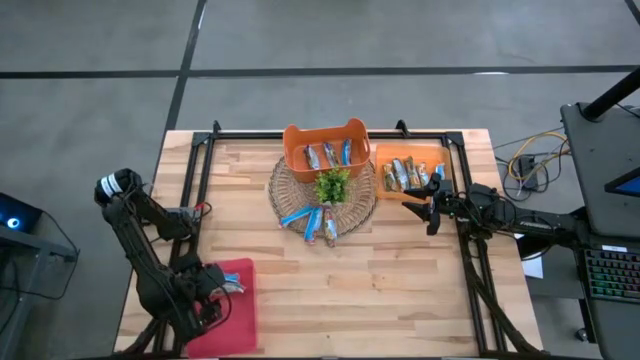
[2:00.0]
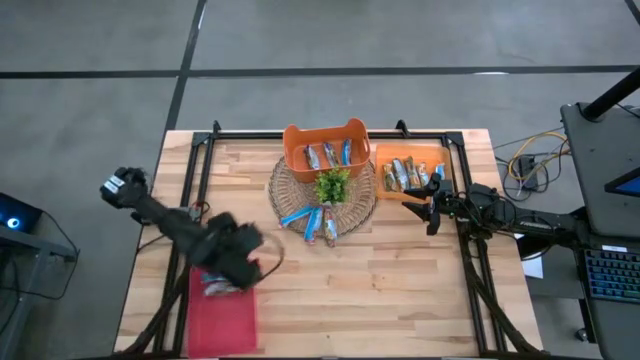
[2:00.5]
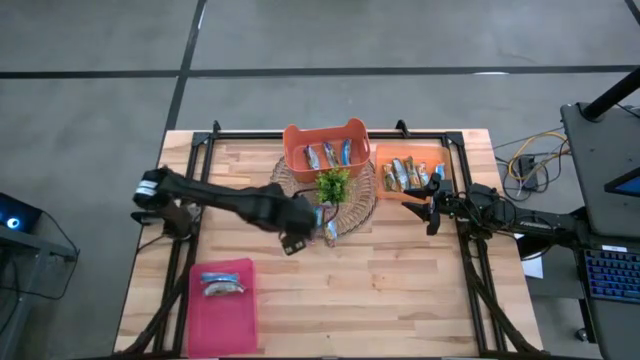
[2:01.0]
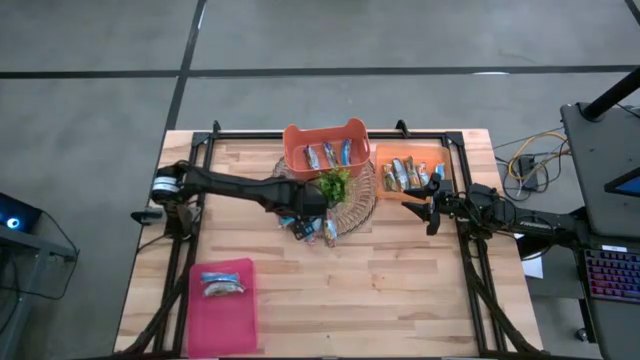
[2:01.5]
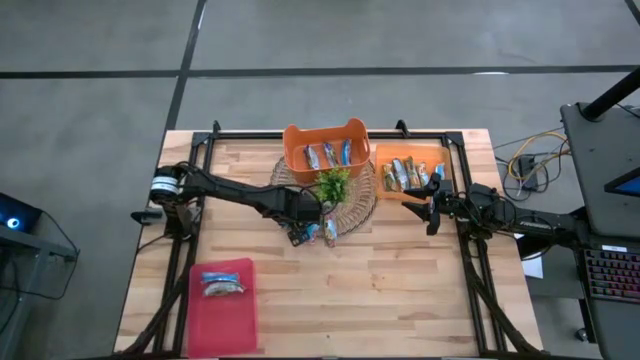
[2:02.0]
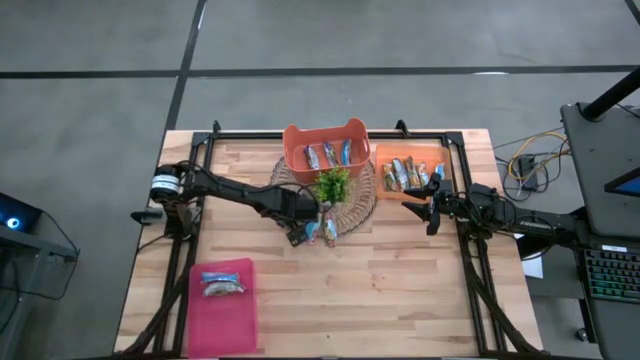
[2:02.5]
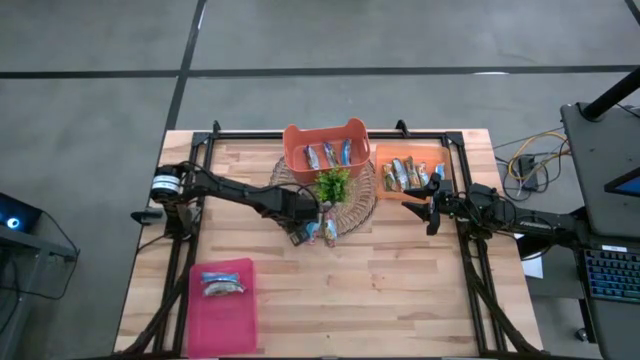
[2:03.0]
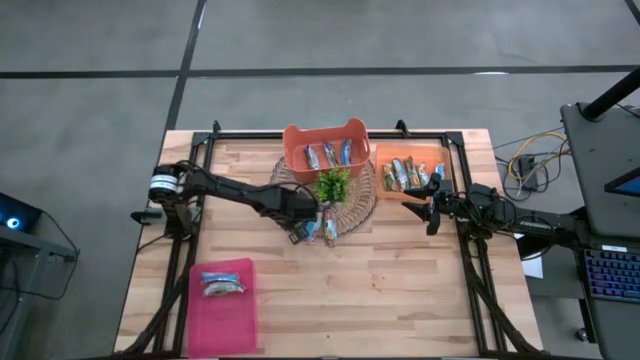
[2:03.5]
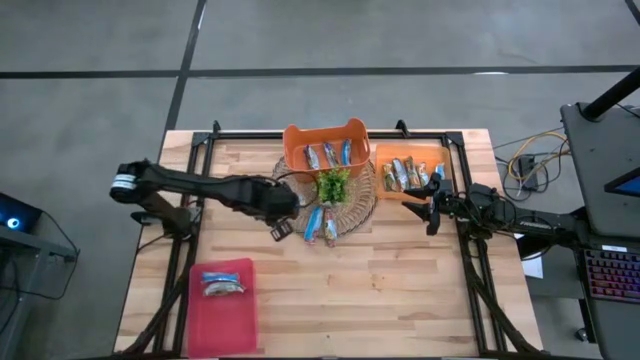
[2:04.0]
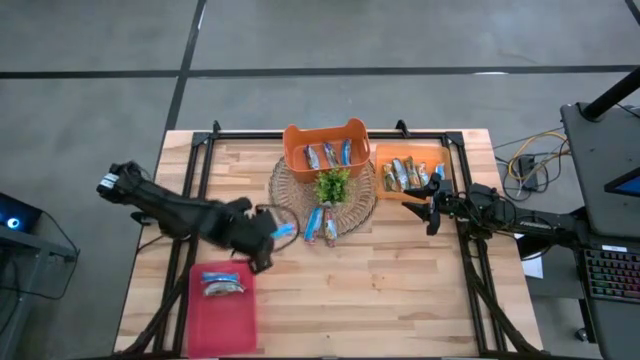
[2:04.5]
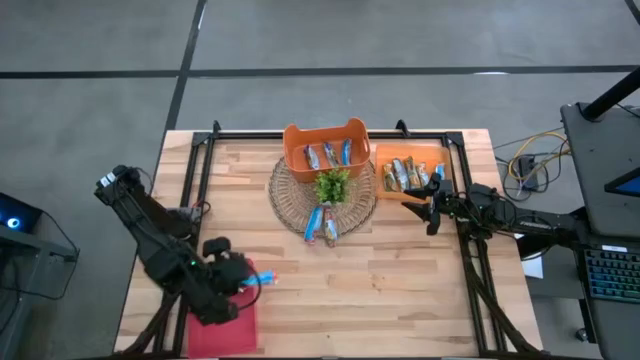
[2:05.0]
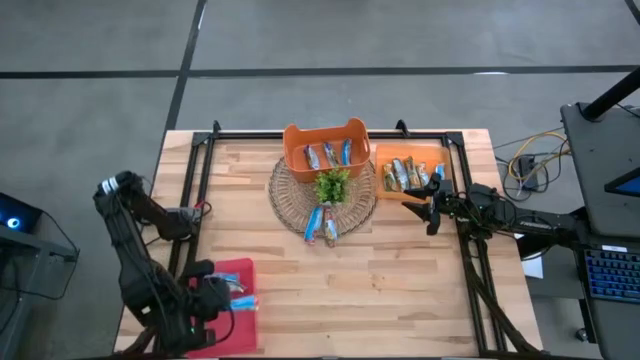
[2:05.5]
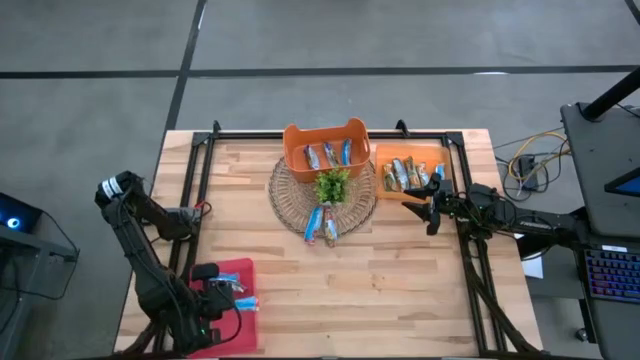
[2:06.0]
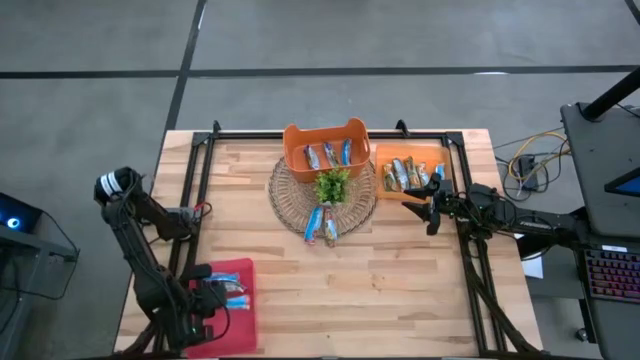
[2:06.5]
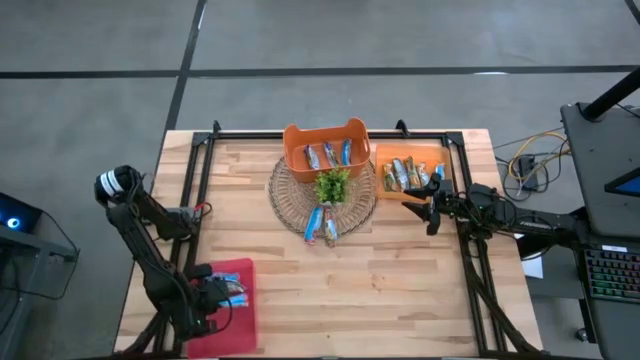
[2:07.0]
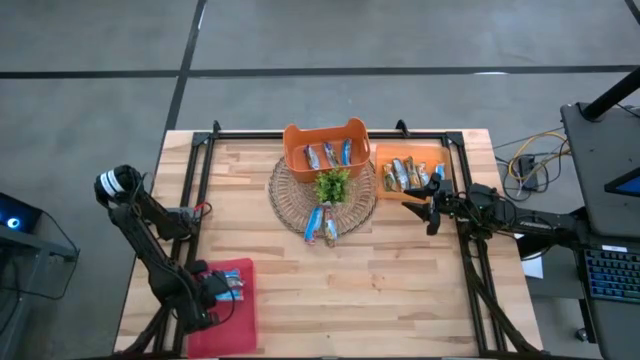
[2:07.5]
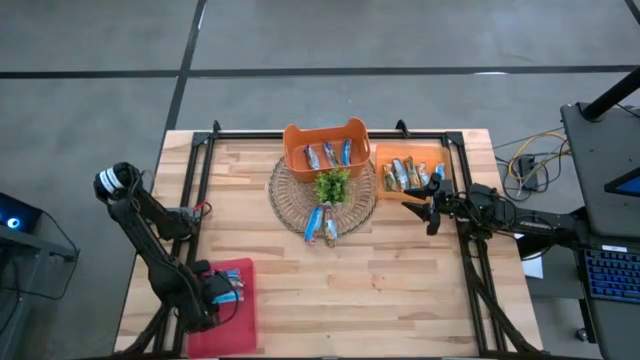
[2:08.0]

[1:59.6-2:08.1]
Task: Pick and place Granola Bars by type
Put the red granola bar into the pink bin

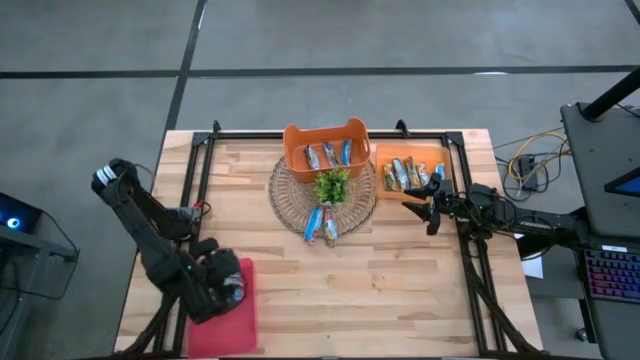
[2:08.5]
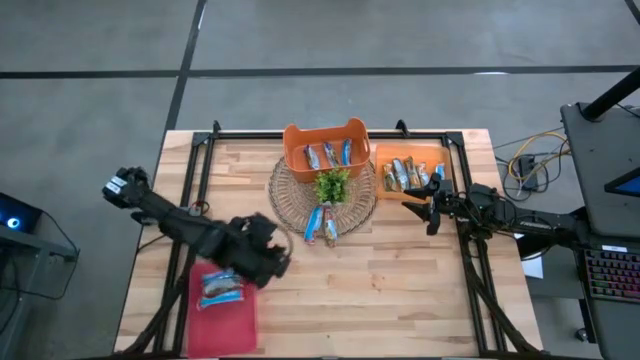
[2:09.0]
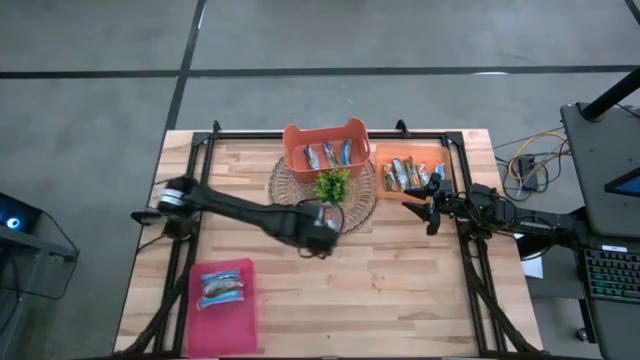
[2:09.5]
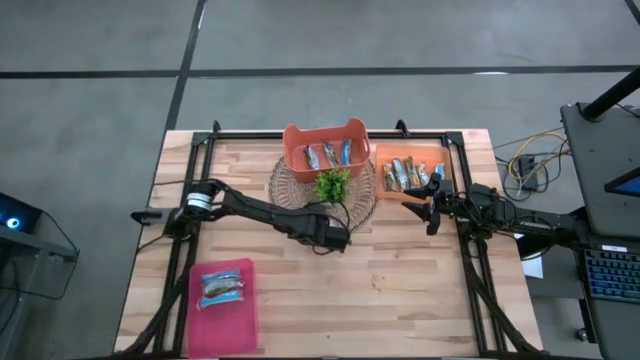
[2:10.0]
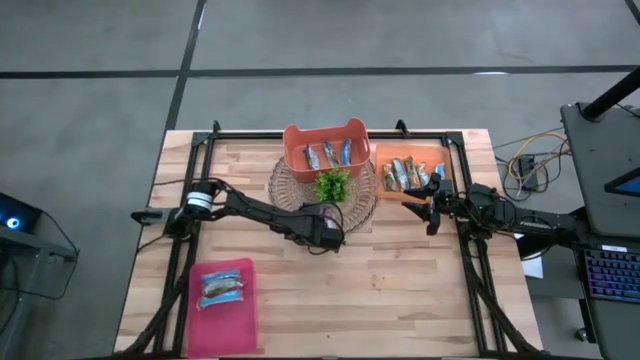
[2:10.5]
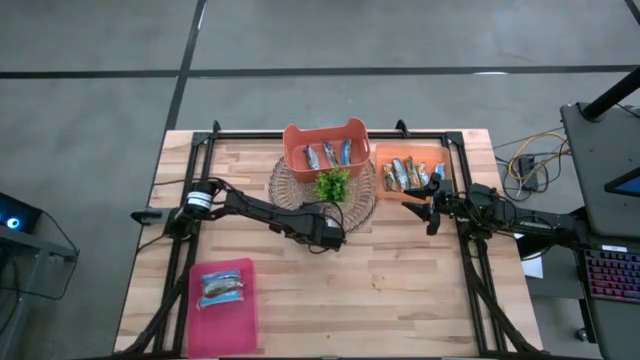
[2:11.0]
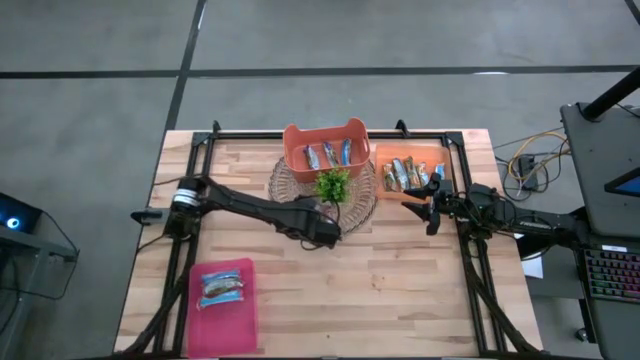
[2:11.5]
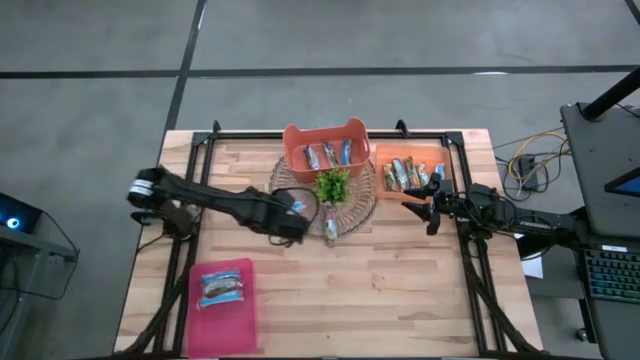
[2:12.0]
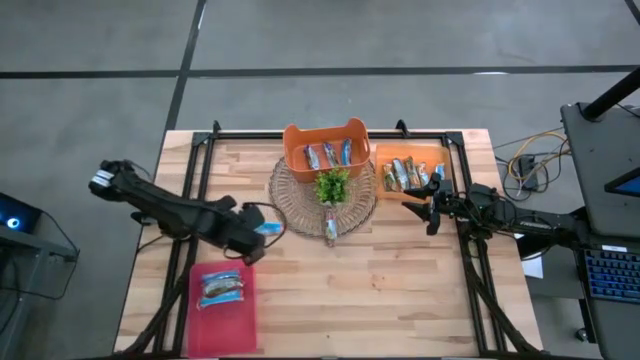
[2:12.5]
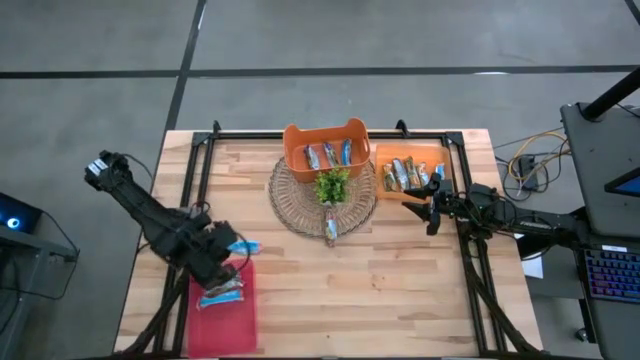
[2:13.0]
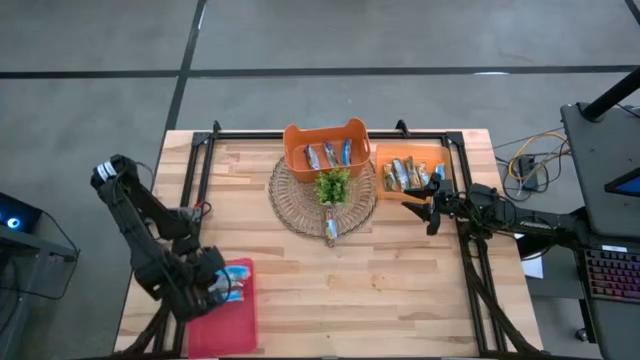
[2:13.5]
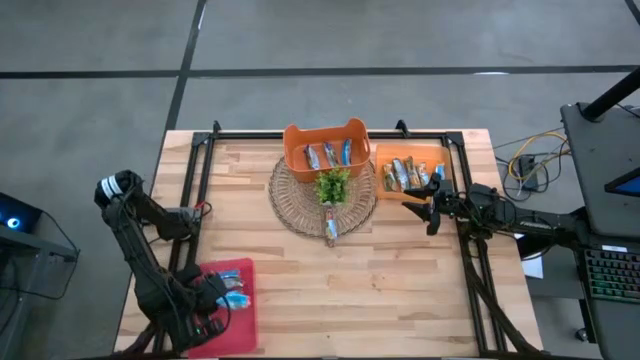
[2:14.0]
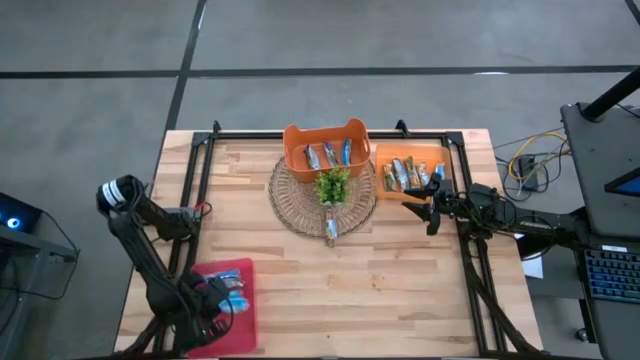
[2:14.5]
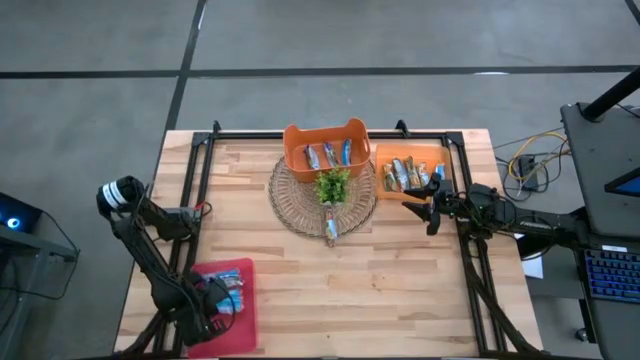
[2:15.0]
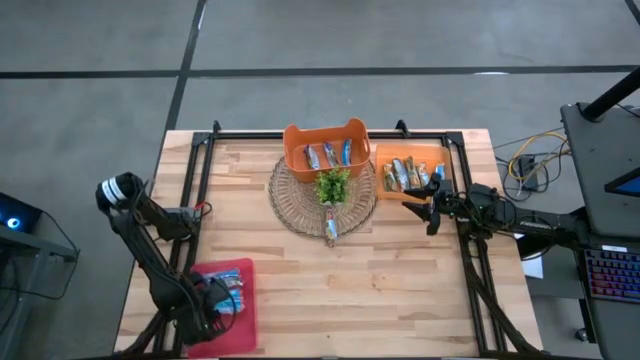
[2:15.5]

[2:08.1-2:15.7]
Put the red granola bar into the pink bin

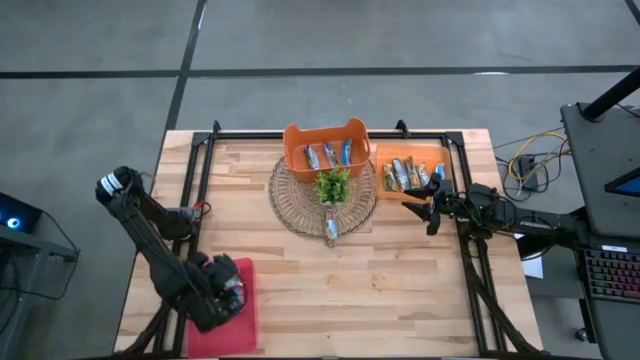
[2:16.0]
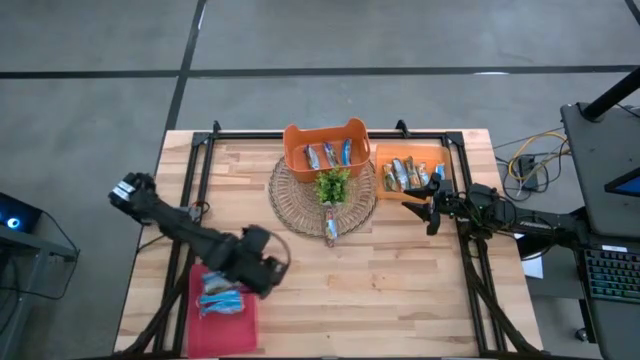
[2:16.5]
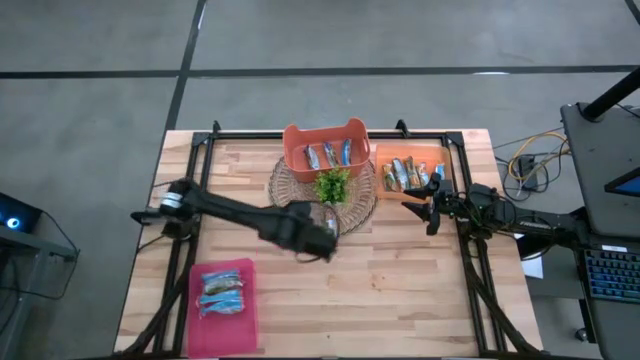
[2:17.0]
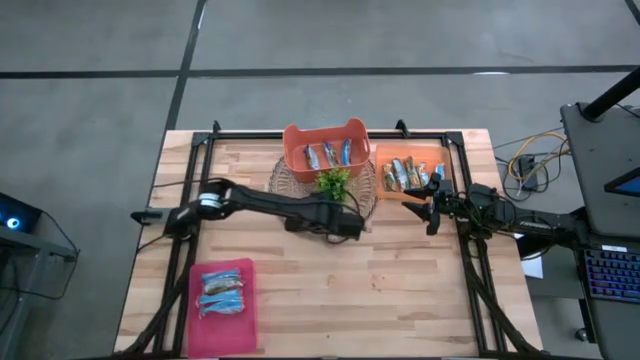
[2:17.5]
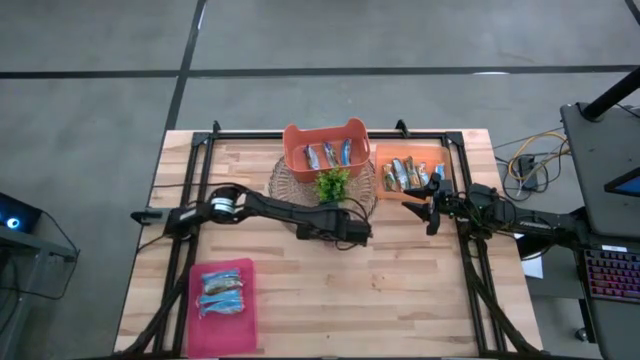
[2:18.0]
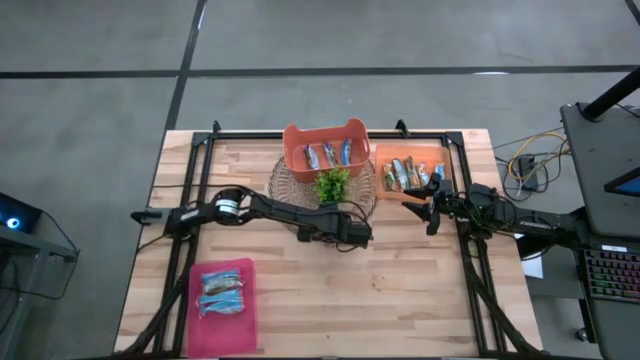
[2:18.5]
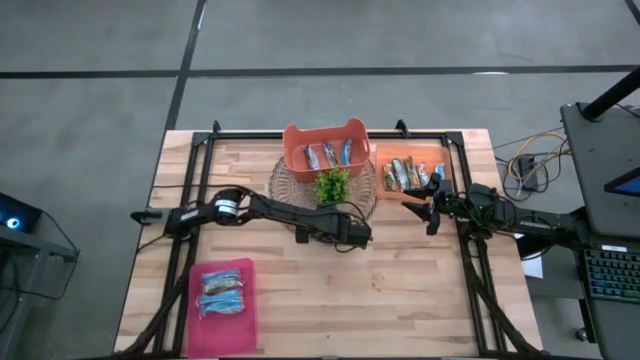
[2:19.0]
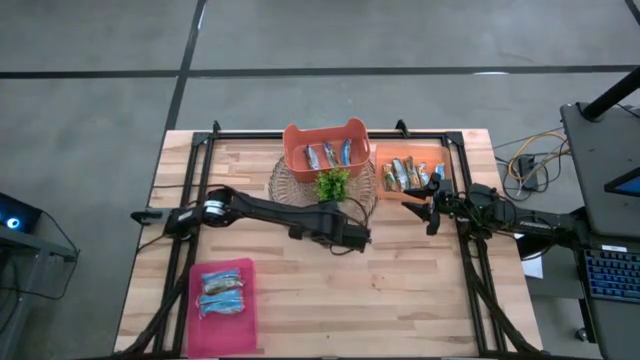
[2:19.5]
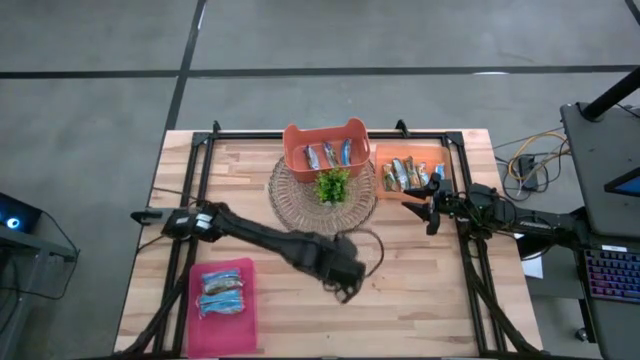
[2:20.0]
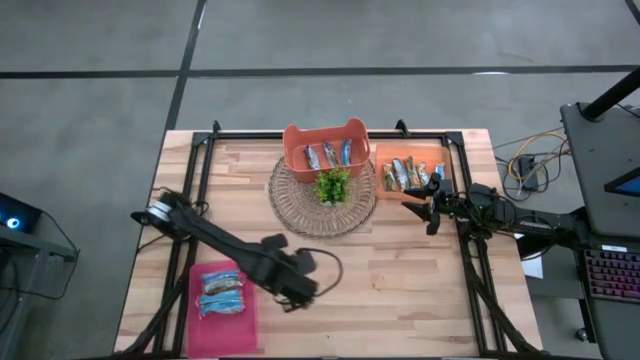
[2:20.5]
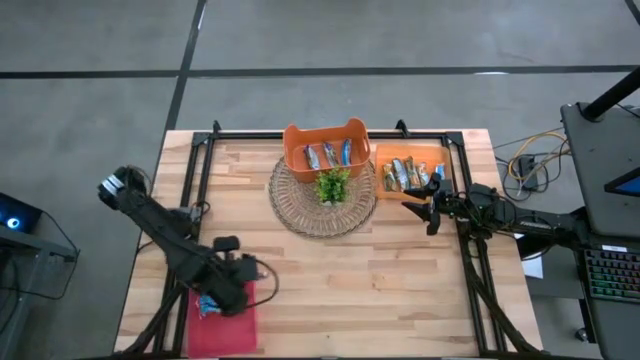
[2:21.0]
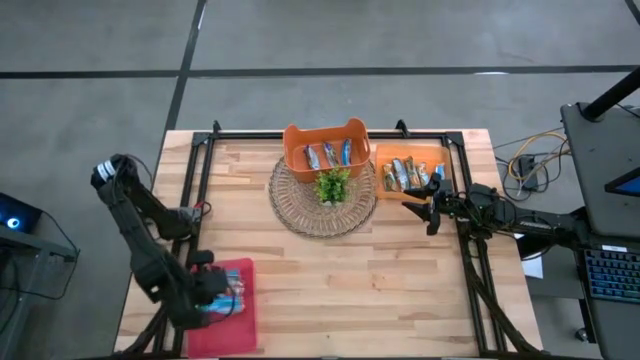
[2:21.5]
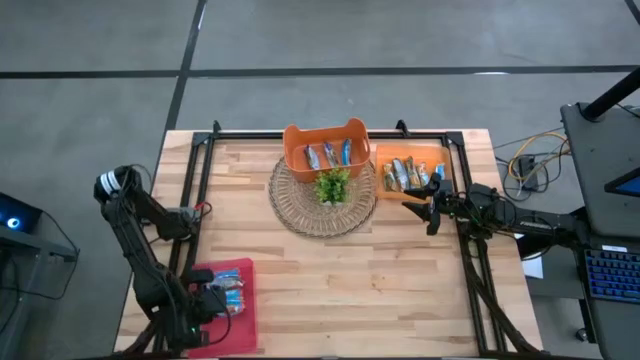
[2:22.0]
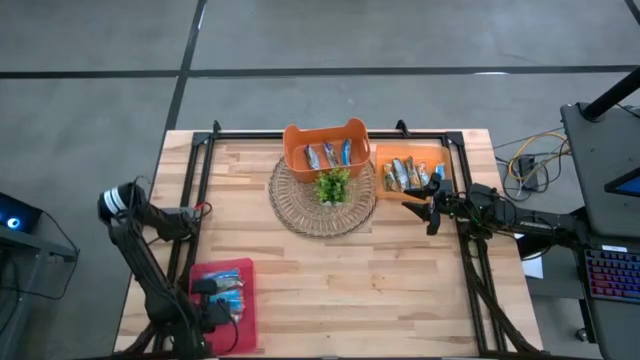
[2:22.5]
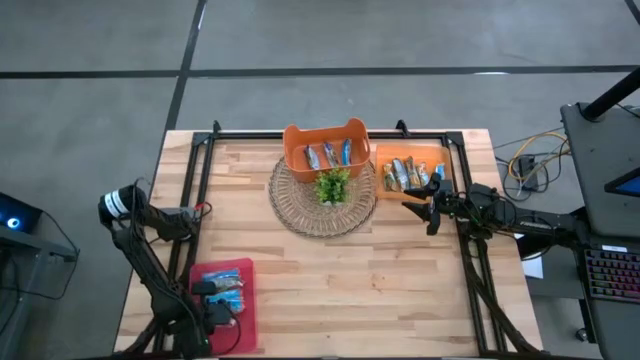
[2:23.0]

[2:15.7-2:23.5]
Put the red granola bar into the pink bin
